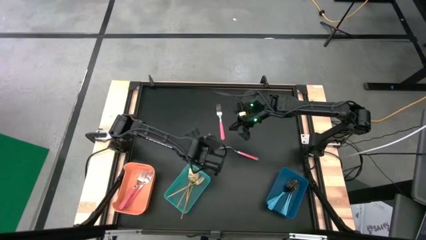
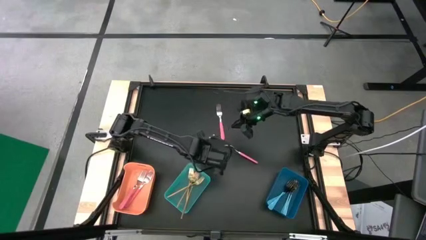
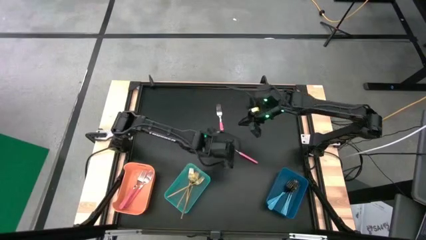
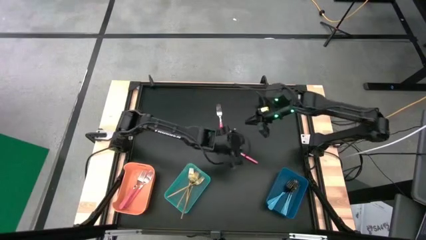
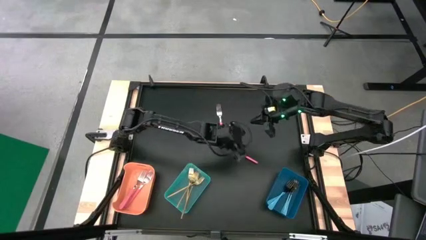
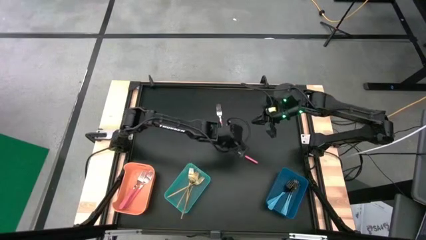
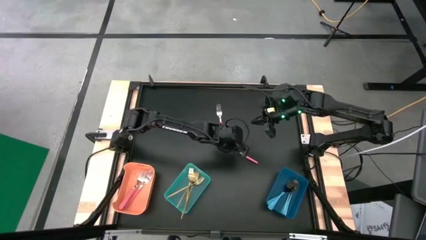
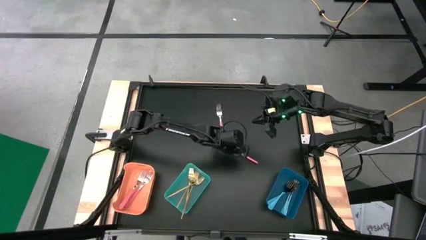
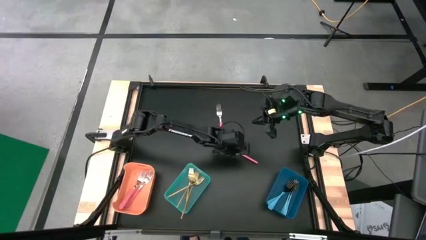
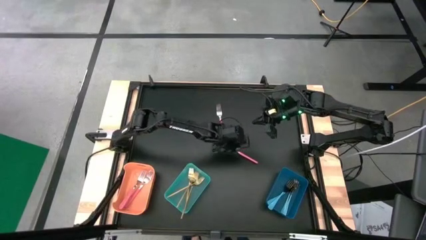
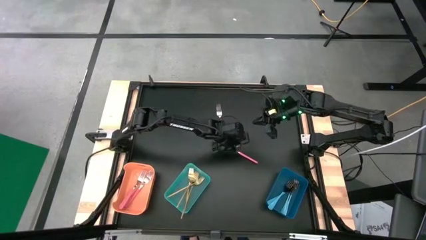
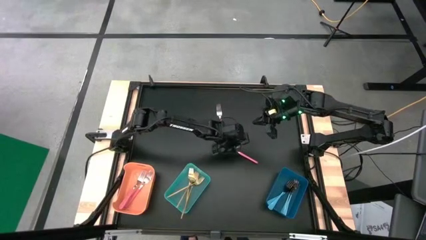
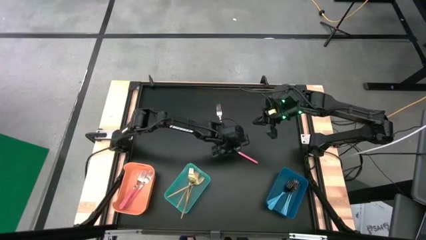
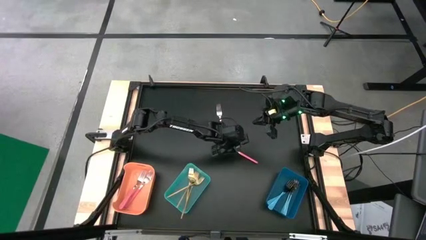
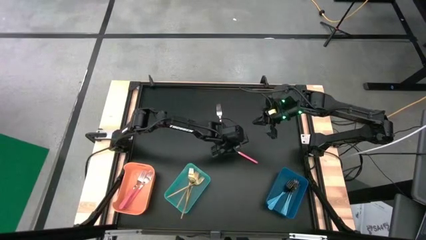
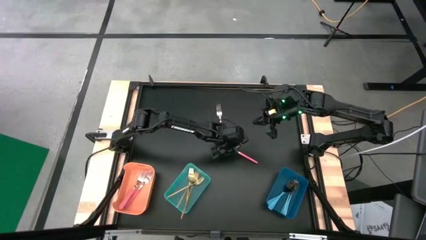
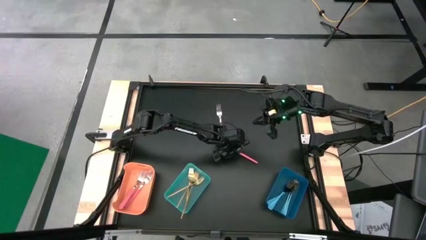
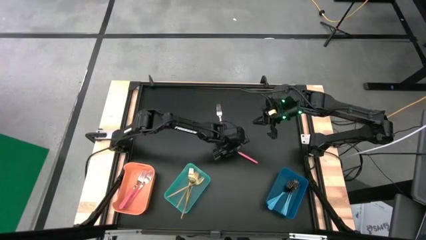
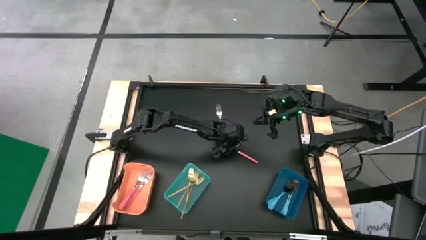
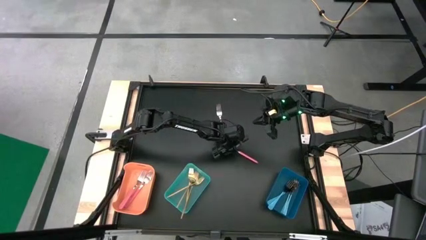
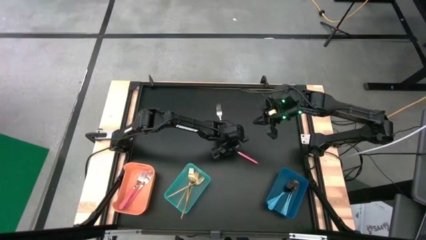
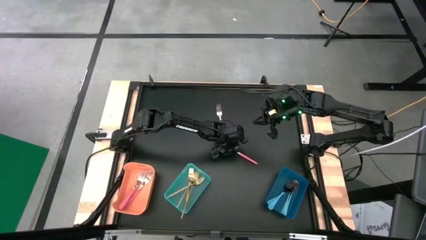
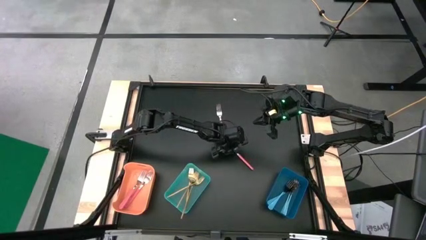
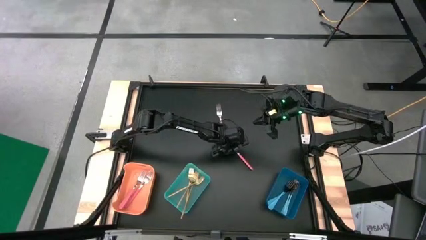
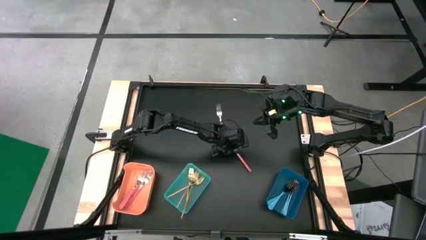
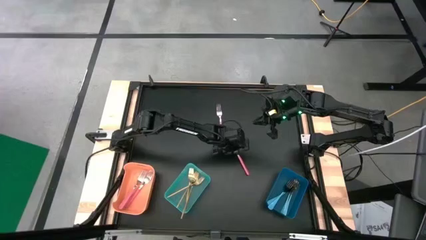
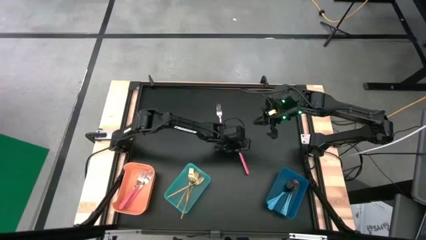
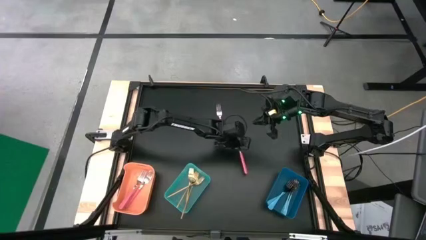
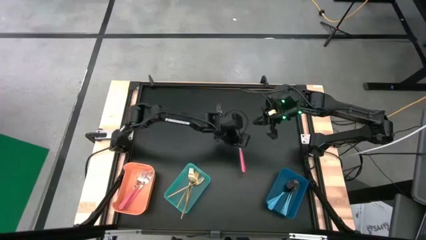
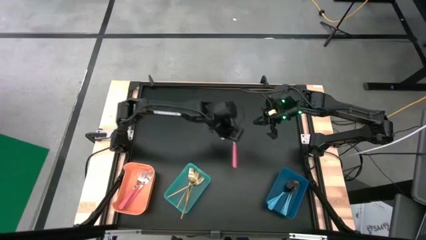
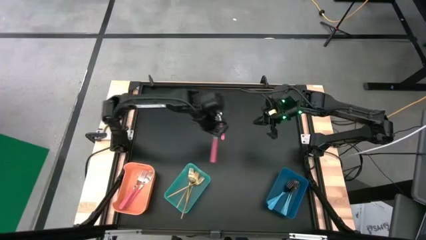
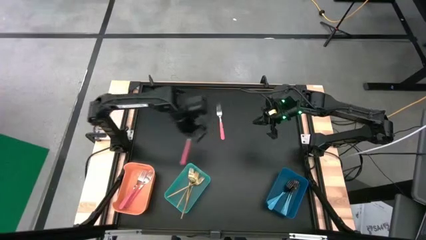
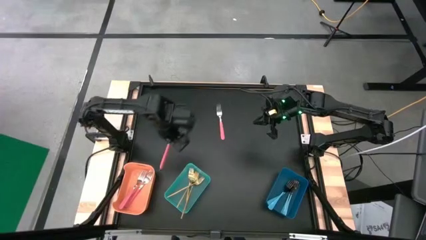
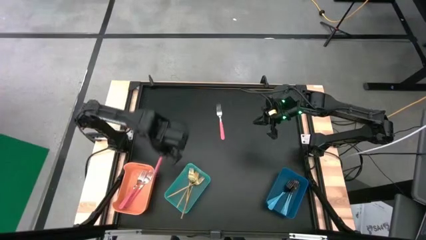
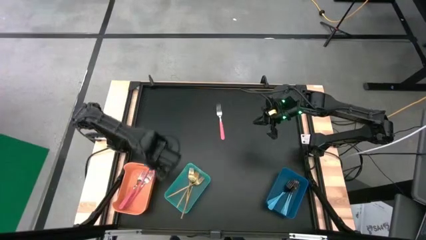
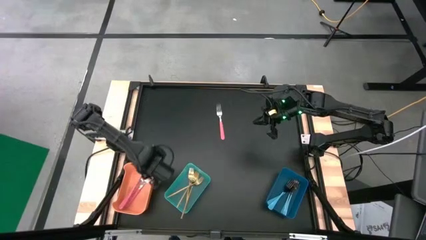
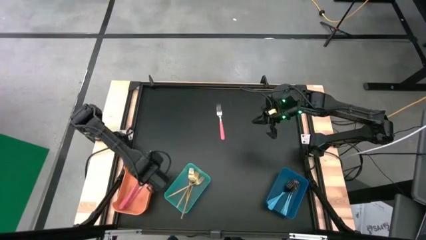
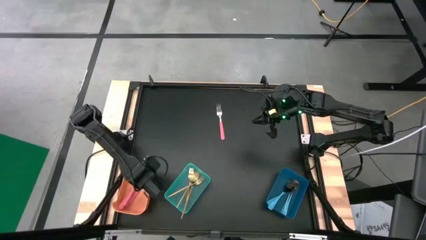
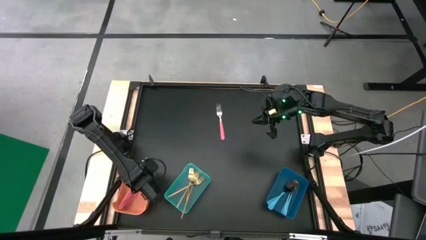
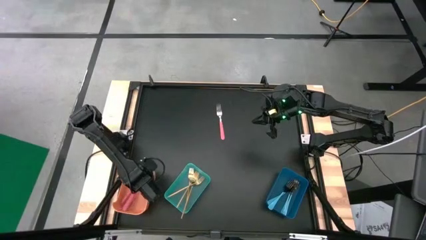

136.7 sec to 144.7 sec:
Task: Sort silverware by color (type)
Put the pink fork into the orange bin

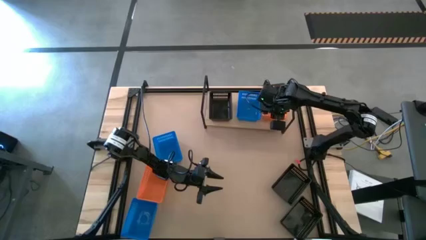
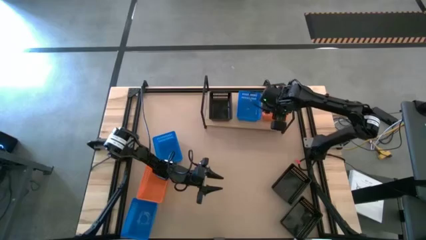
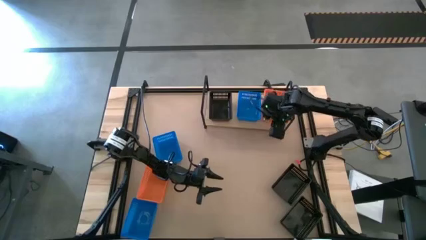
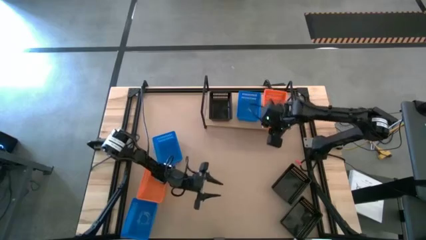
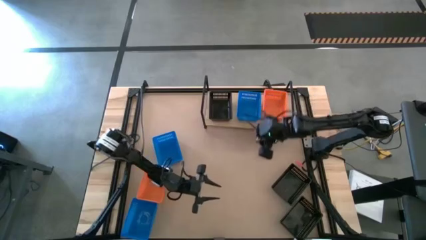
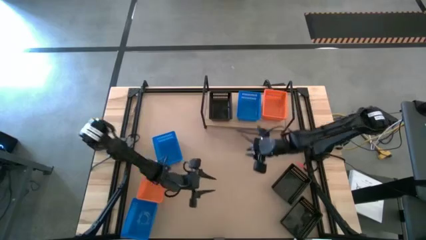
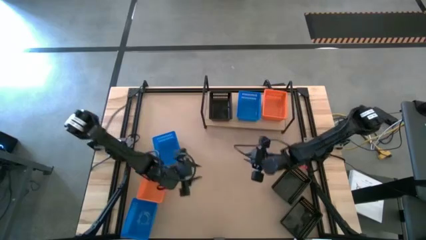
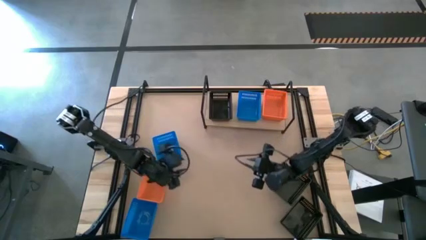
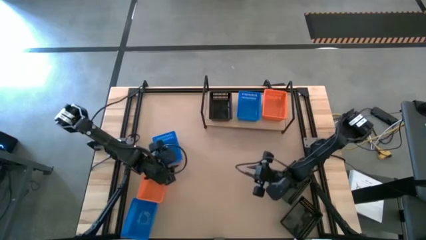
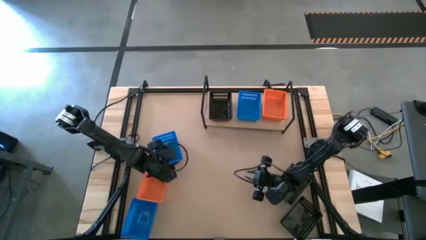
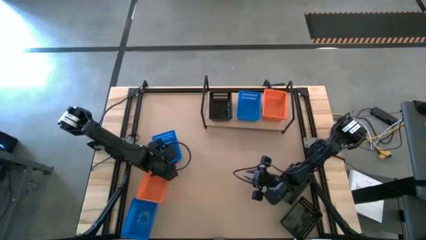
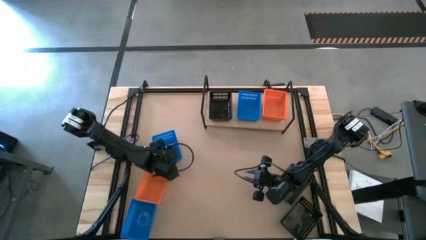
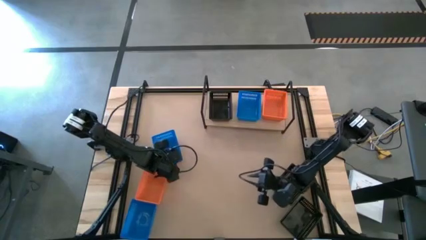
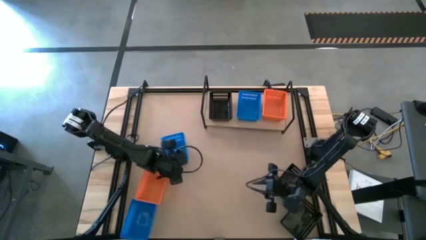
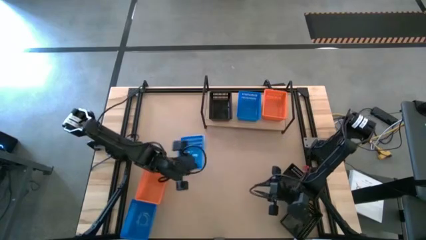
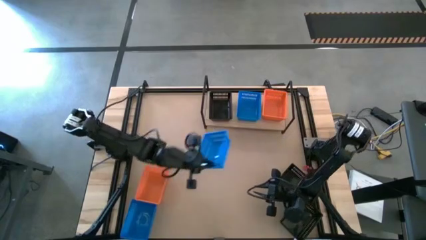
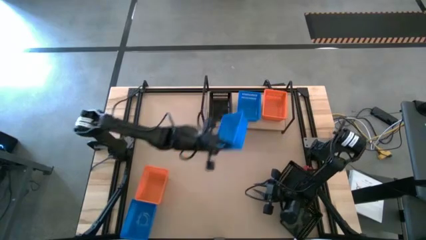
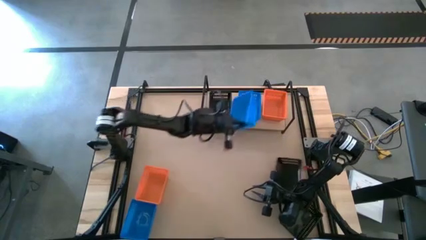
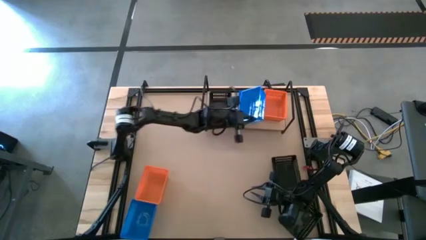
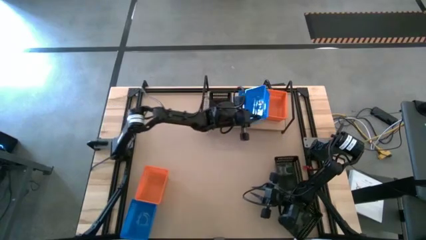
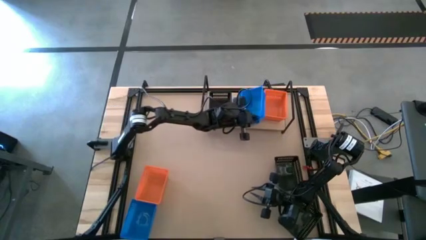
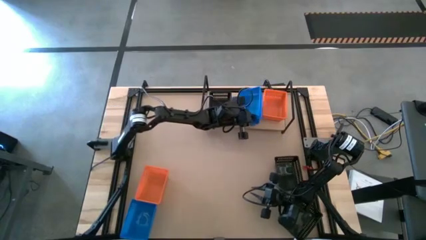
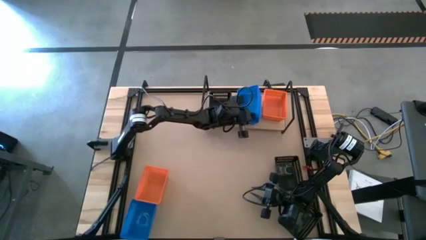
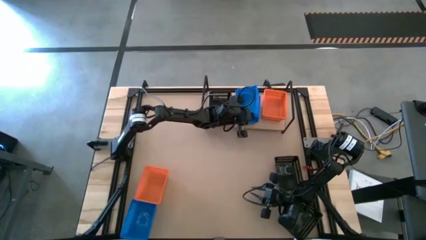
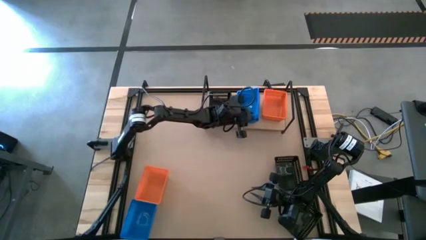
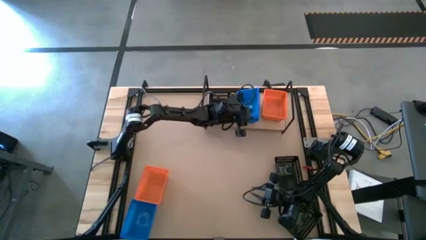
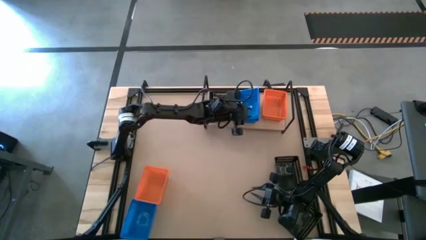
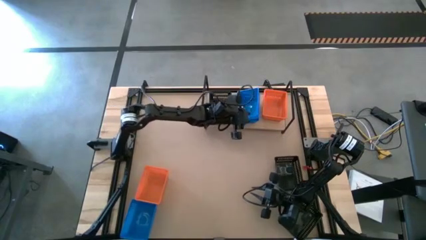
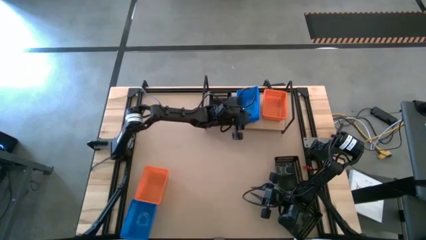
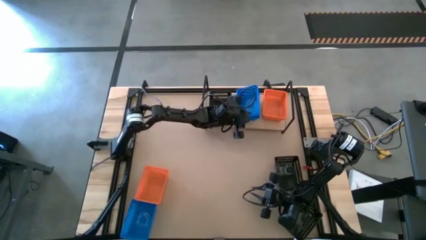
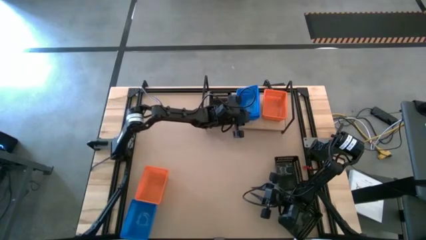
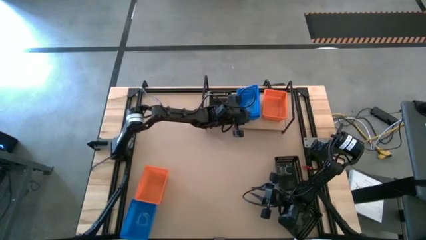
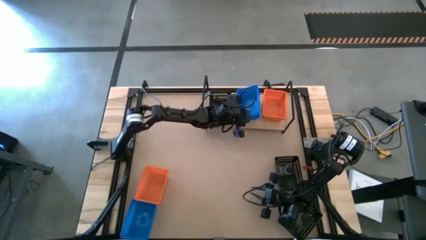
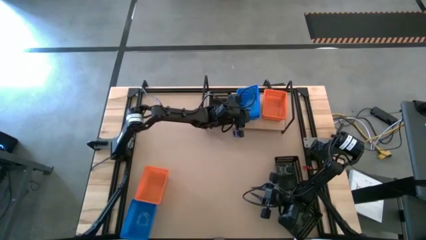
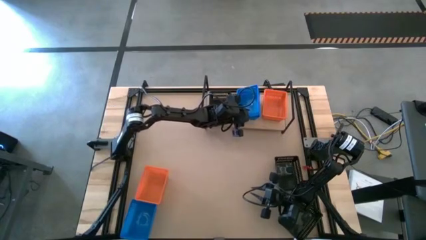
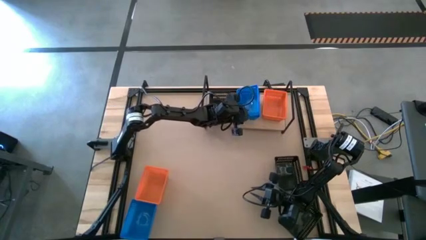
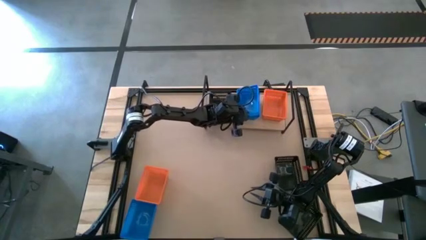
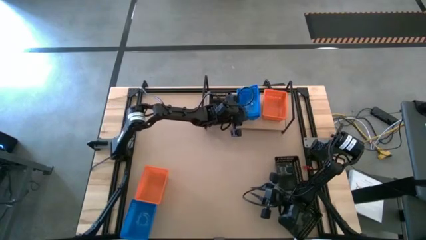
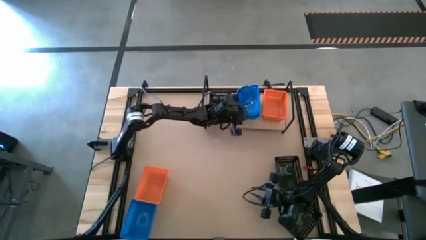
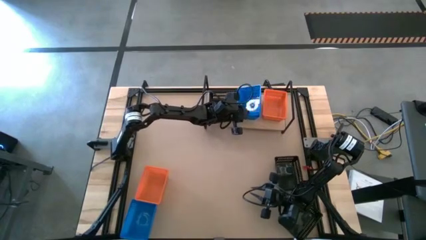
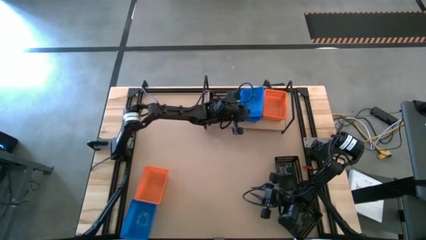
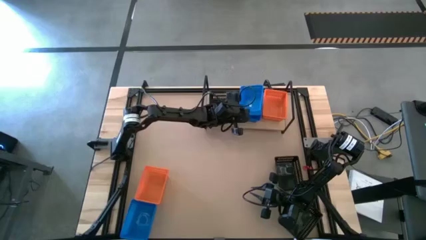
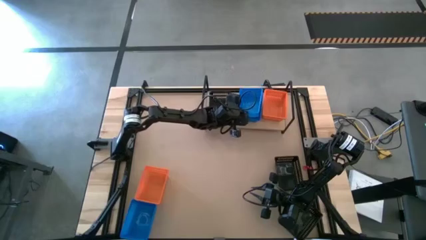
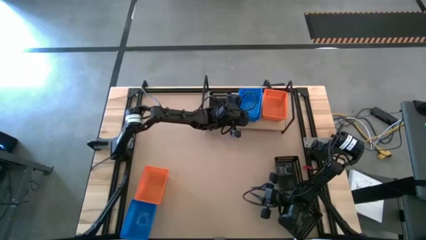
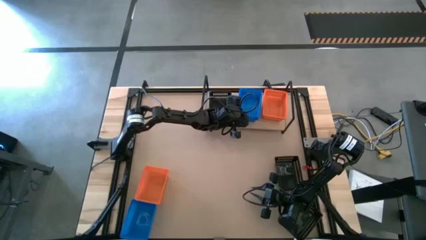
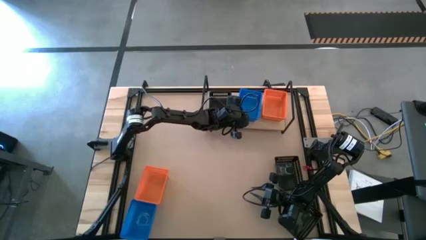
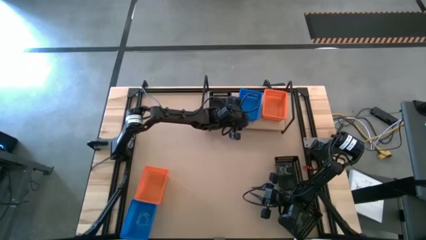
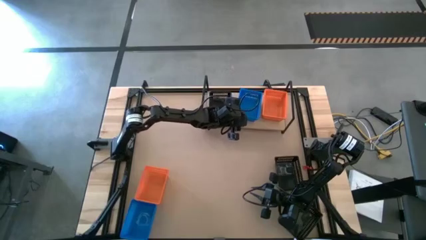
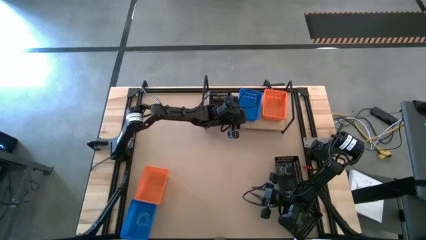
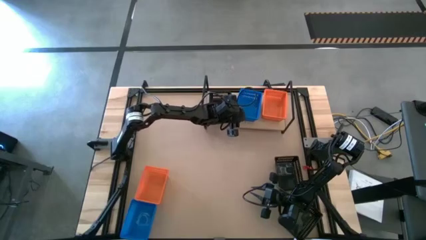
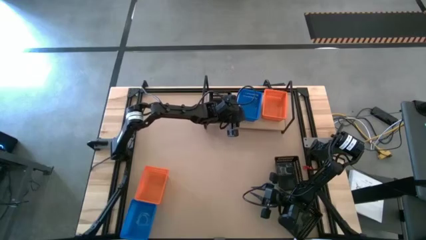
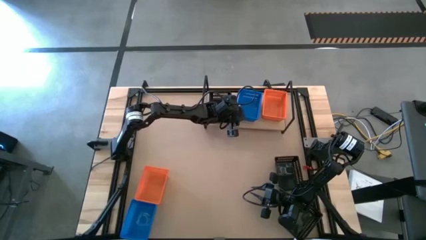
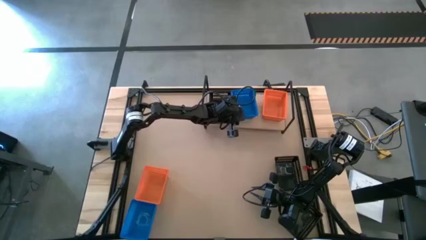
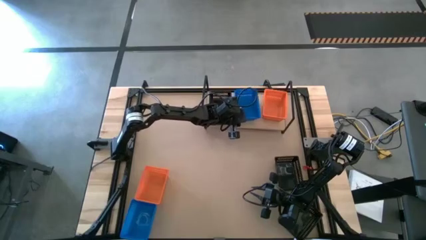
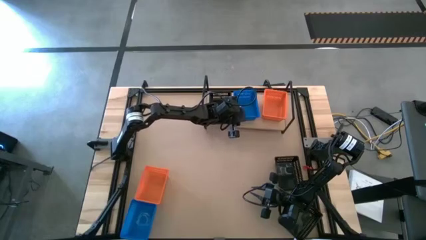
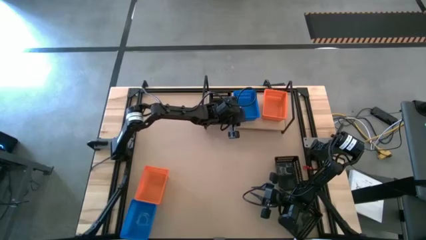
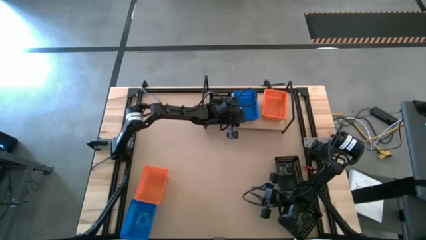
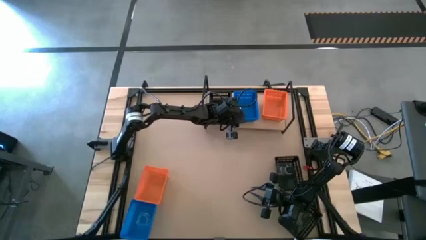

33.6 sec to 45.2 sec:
Task: Stack baskets on shelf by color
Stack the top blue basket on top of the blue basket on the shelf
